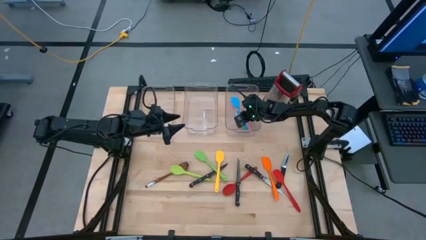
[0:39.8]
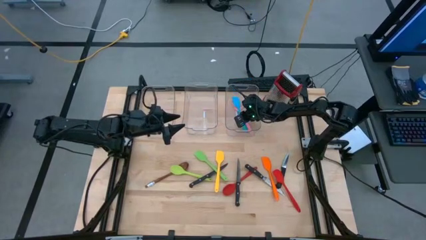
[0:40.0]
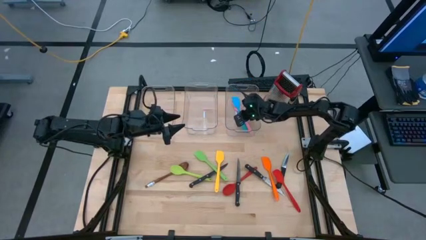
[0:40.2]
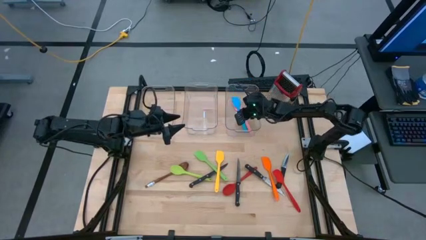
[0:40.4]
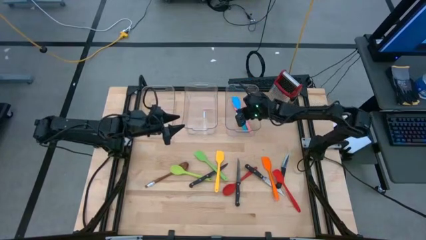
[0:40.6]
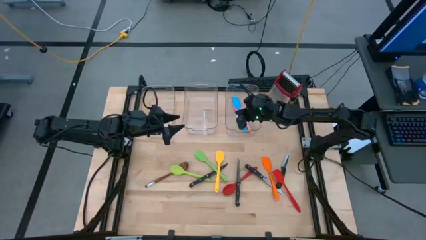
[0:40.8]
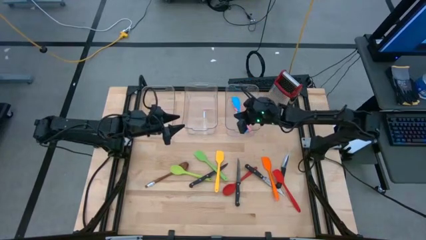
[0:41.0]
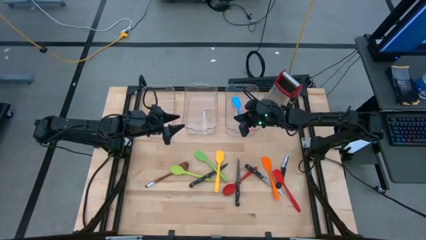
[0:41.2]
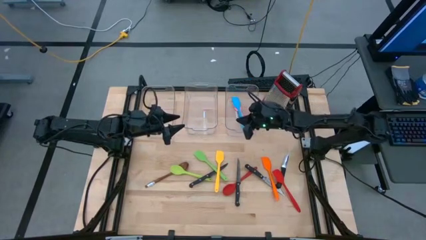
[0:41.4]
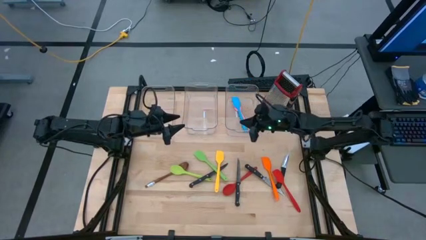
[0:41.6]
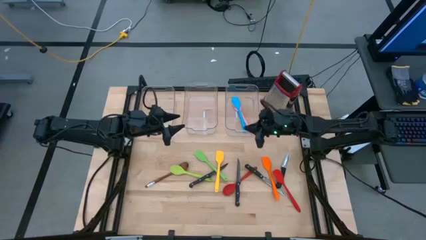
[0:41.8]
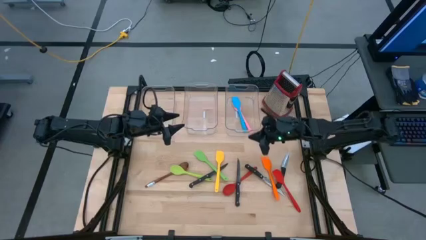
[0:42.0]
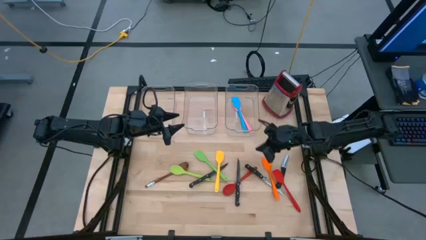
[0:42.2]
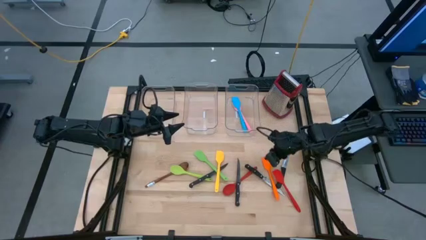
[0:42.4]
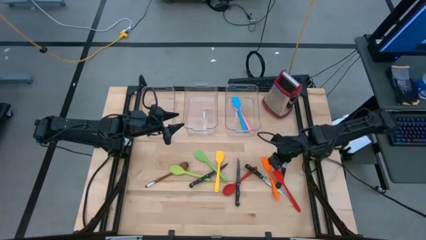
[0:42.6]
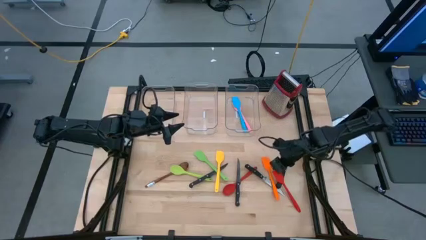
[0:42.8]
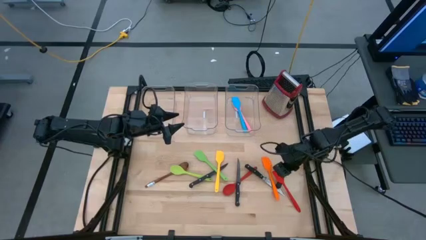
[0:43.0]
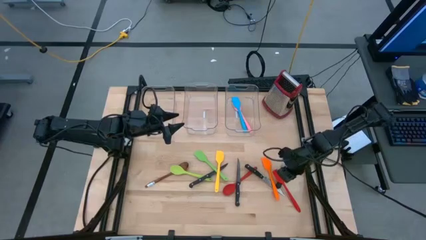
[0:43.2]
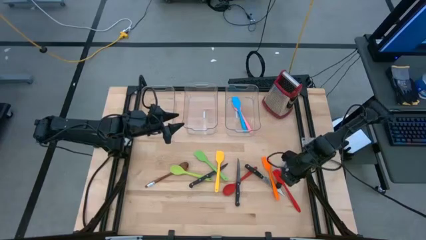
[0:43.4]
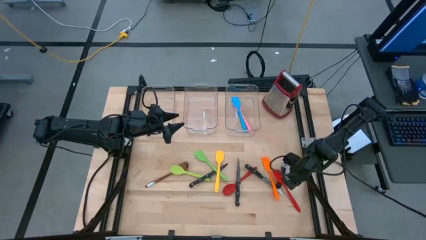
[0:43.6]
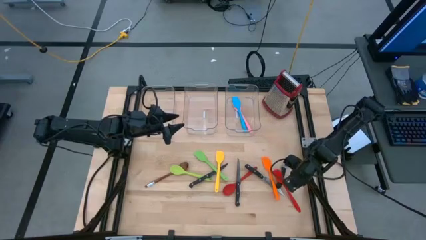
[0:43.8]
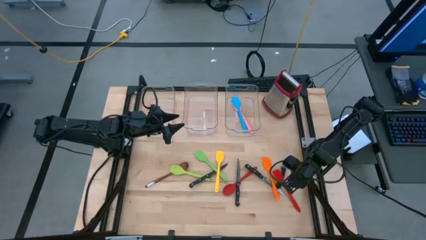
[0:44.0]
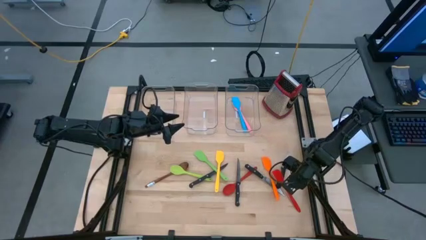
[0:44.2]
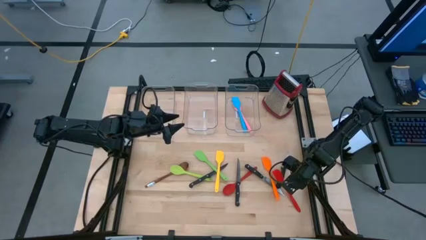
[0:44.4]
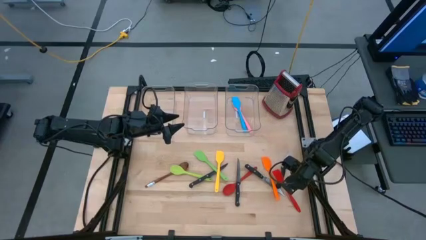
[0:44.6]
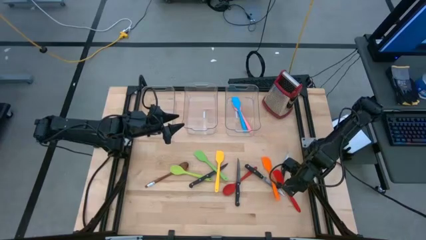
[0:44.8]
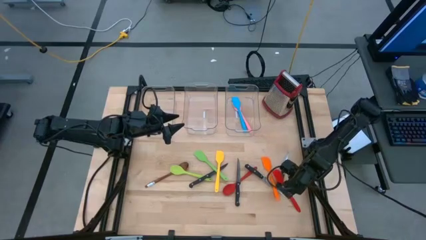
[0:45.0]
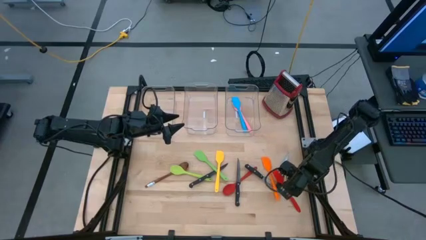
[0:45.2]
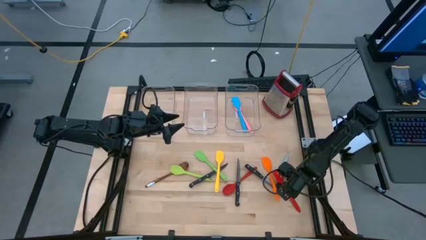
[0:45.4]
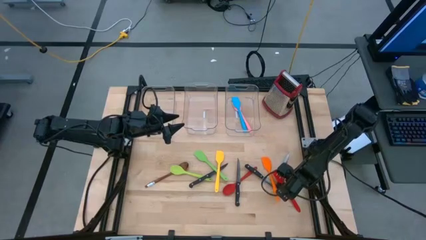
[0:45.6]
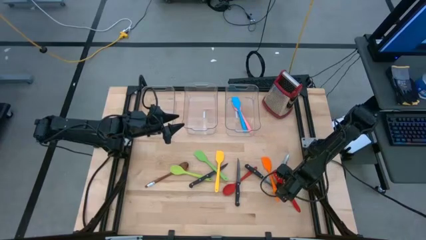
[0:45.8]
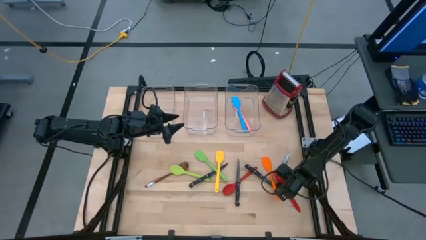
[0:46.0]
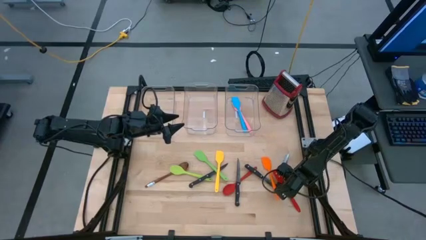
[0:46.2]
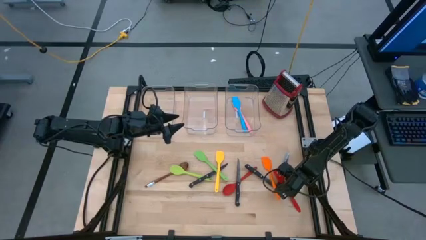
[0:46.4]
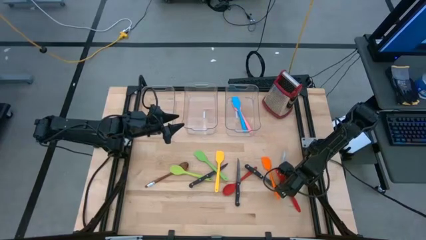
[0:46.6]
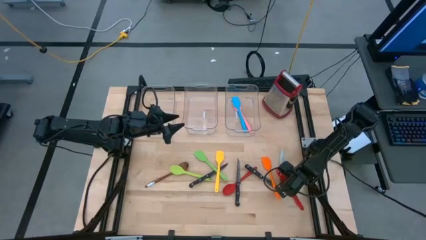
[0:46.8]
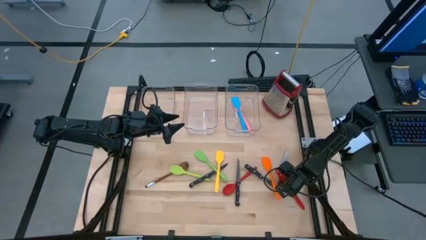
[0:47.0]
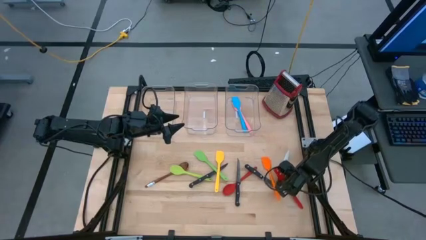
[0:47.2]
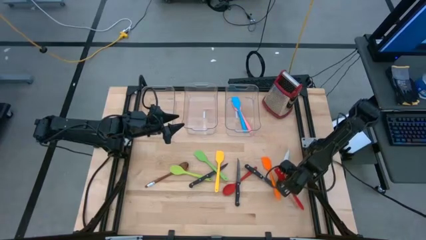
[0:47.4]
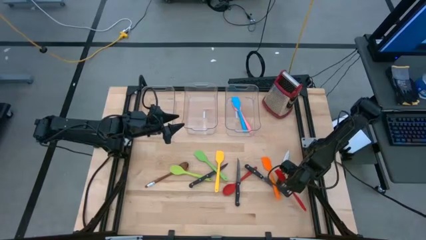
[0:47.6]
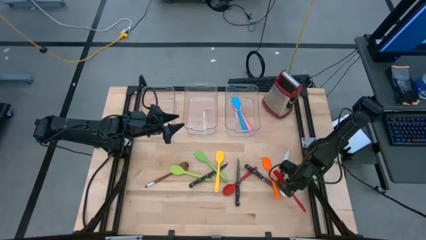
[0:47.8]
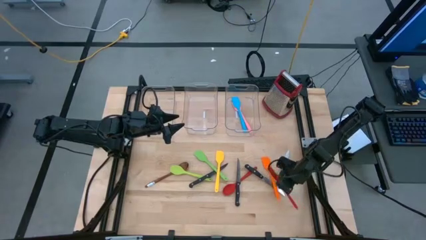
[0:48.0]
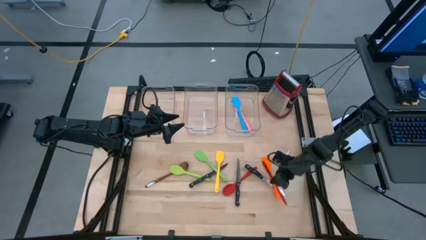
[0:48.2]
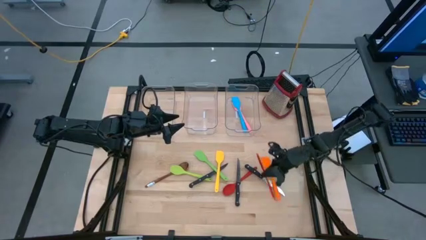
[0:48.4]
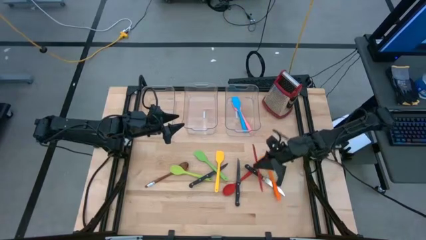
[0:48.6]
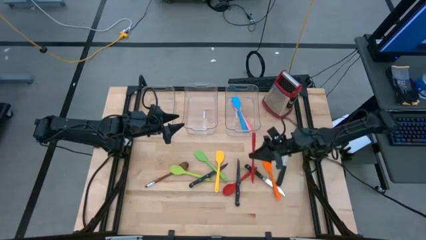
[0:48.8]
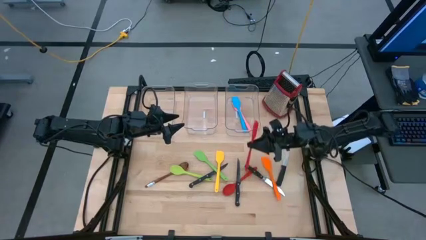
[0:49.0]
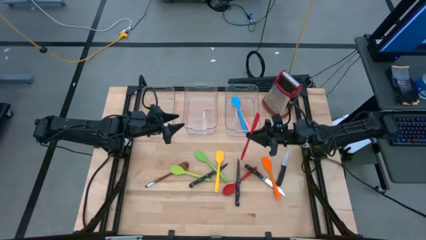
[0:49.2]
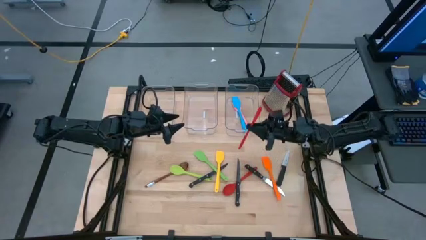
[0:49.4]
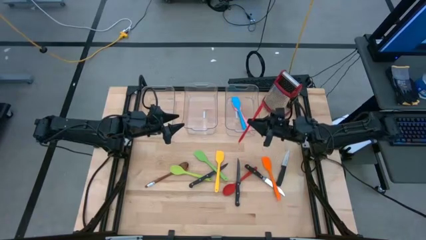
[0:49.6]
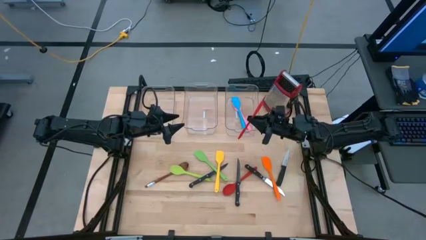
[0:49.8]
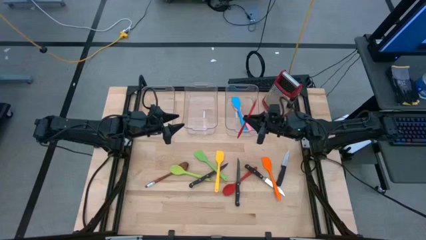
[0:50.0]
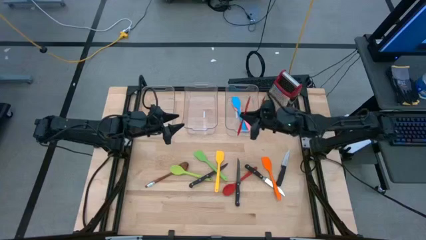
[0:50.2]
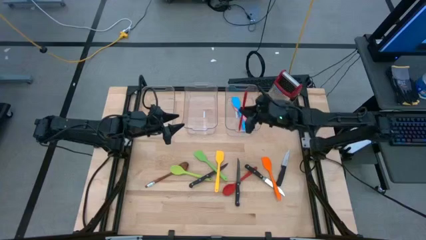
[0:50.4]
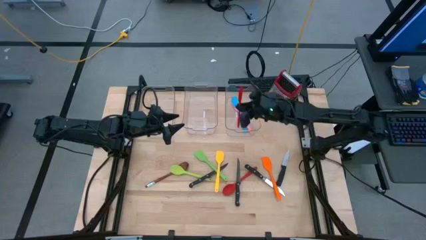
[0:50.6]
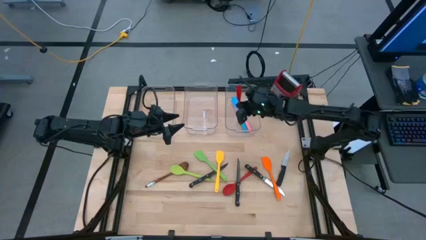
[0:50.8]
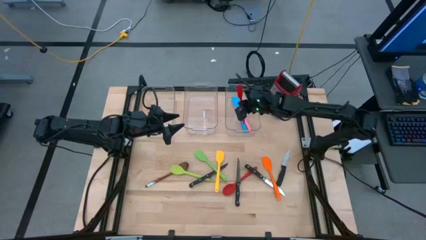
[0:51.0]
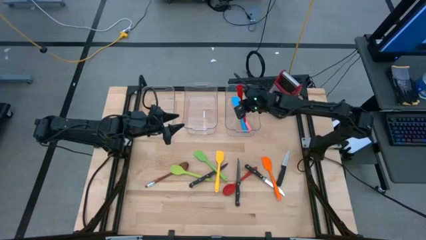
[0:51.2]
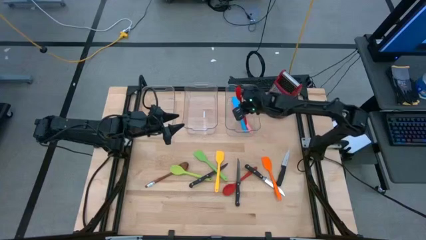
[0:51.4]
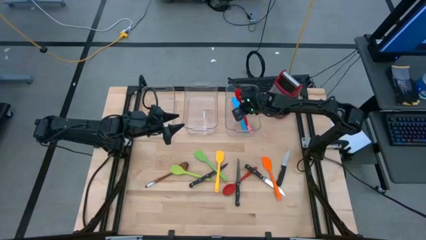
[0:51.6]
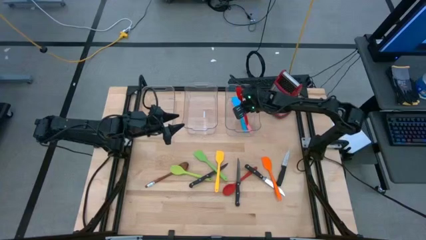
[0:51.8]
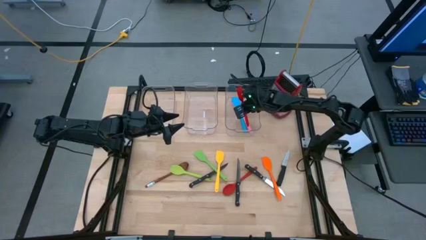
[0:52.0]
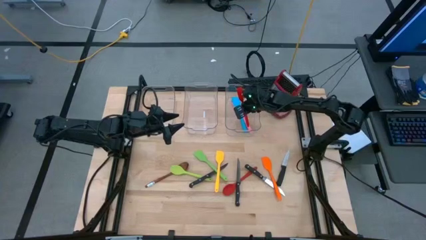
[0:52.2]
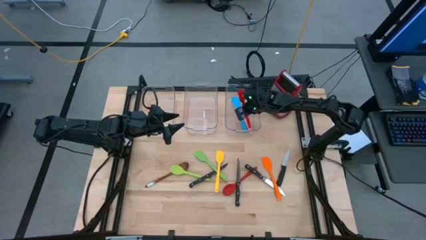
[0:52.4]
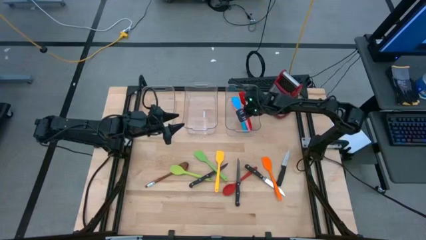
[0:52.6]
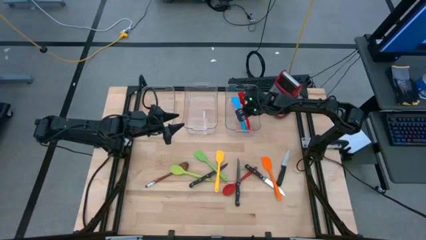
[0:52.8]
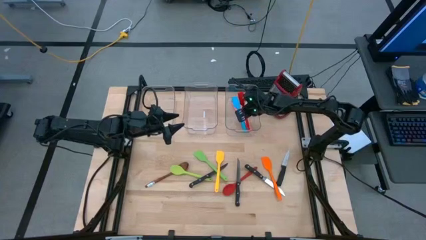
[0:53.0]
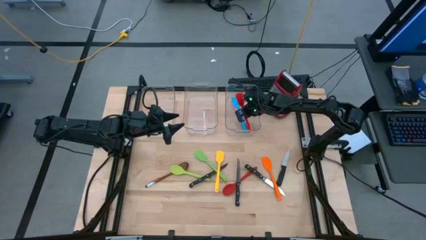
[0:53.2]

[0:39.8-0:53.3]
Task: Pick & Place Kitchen Items
Put the red spatula into the right transparent bin
